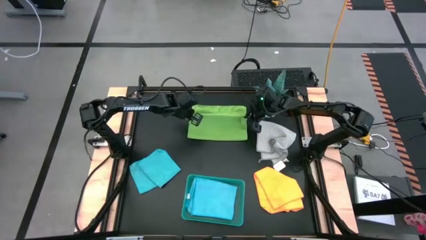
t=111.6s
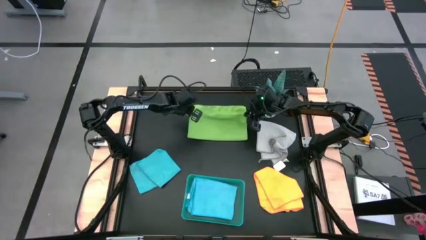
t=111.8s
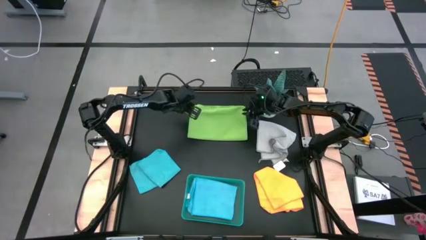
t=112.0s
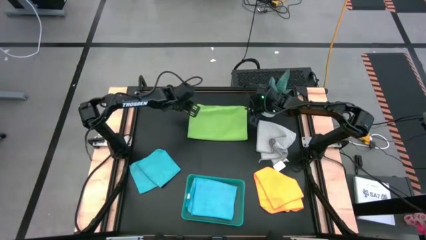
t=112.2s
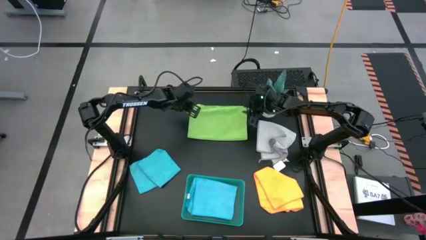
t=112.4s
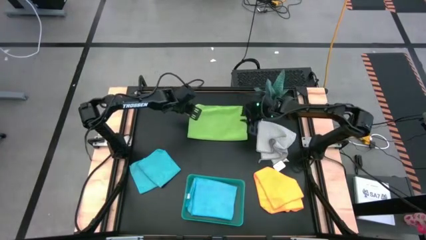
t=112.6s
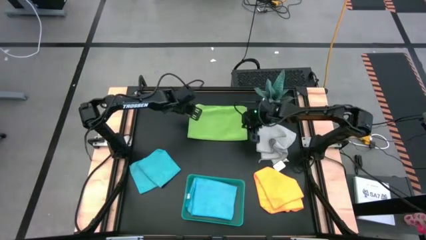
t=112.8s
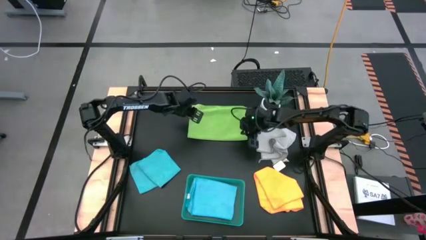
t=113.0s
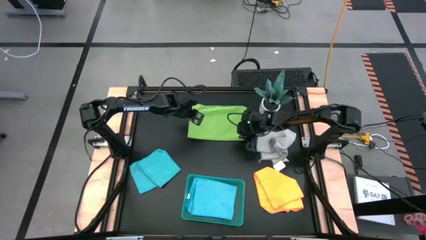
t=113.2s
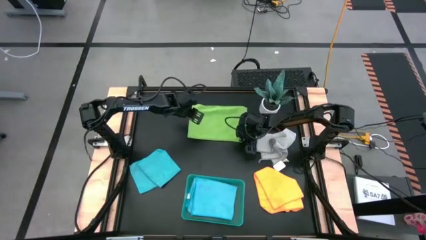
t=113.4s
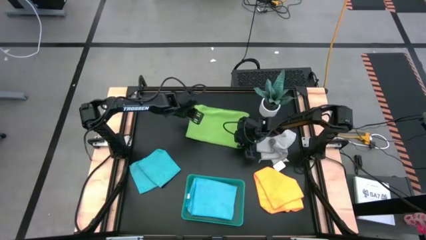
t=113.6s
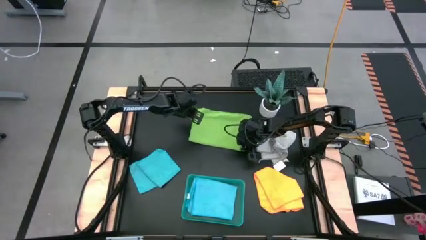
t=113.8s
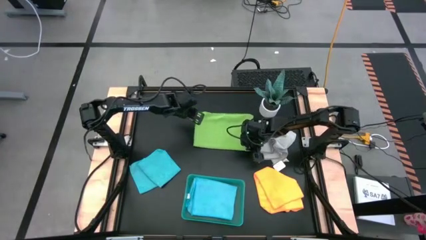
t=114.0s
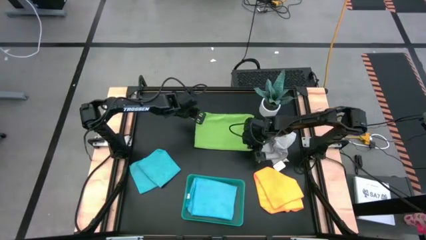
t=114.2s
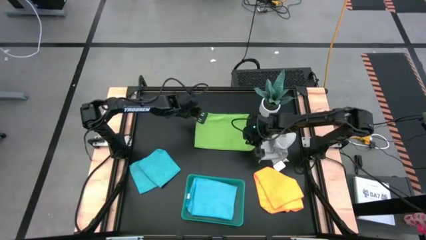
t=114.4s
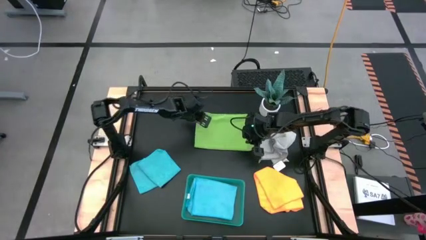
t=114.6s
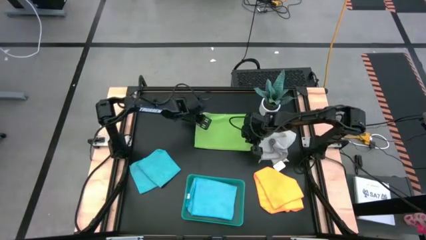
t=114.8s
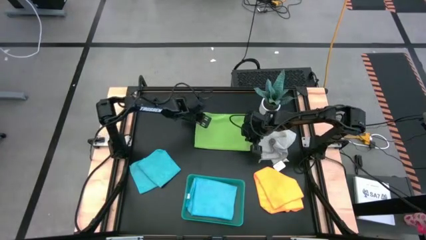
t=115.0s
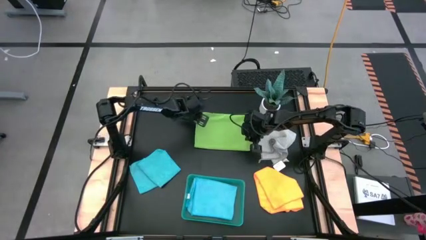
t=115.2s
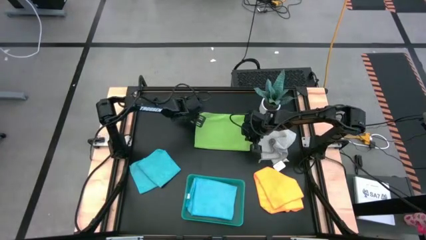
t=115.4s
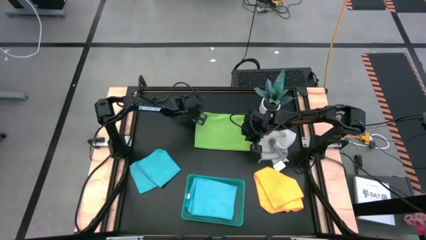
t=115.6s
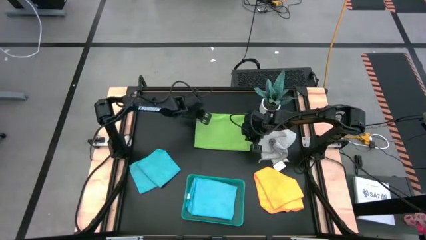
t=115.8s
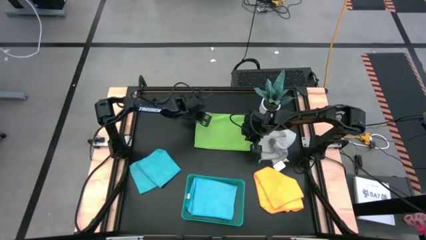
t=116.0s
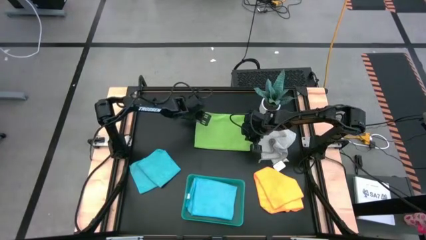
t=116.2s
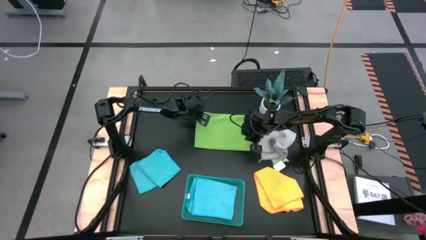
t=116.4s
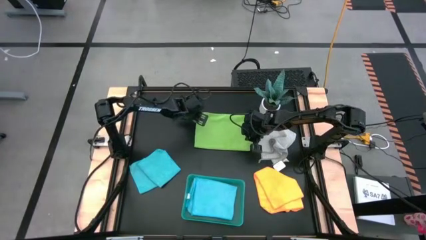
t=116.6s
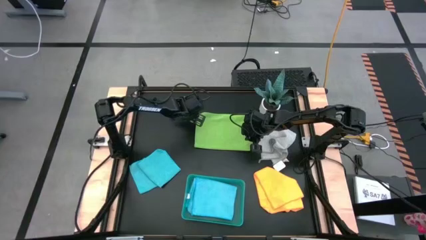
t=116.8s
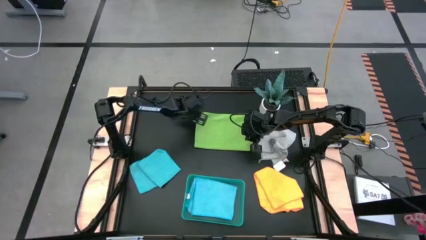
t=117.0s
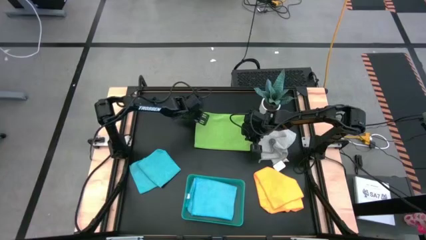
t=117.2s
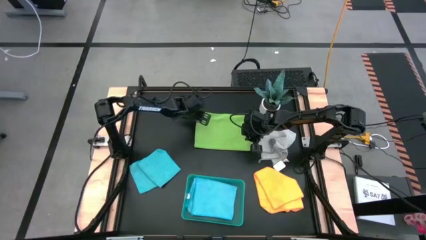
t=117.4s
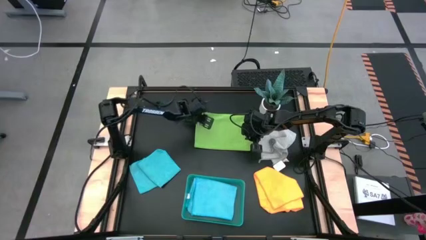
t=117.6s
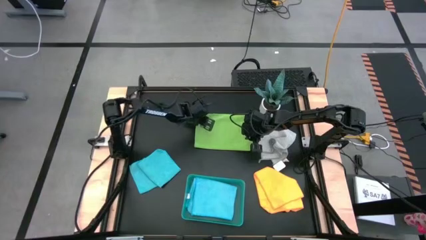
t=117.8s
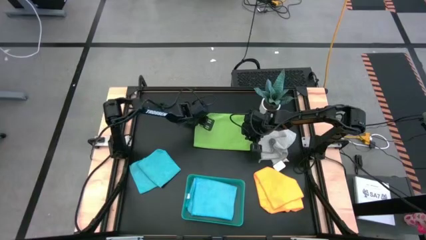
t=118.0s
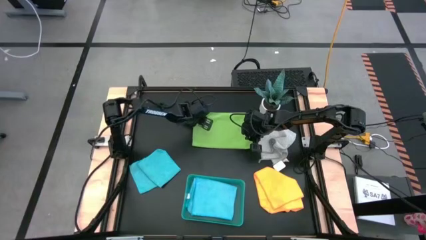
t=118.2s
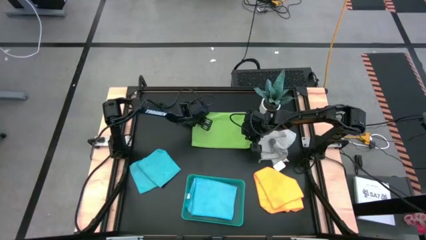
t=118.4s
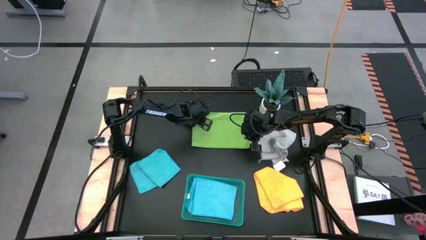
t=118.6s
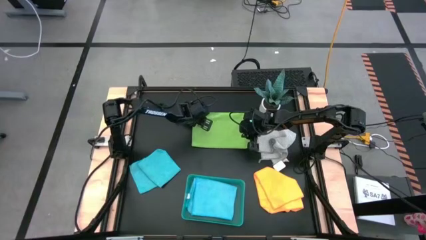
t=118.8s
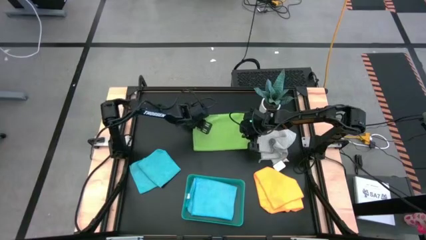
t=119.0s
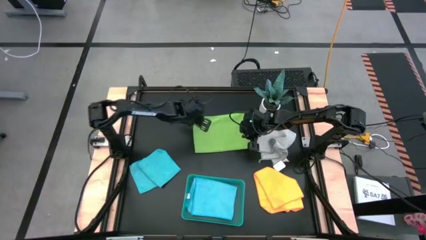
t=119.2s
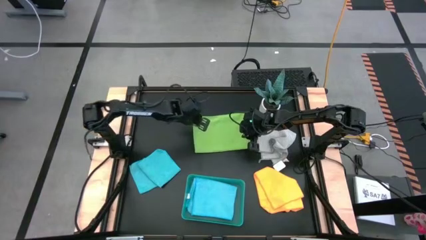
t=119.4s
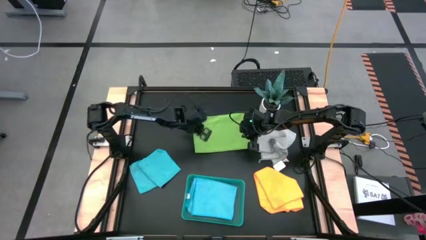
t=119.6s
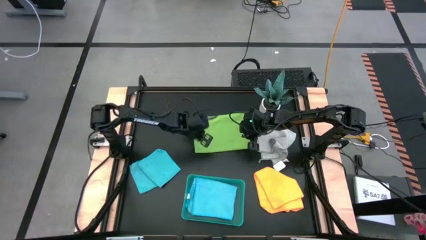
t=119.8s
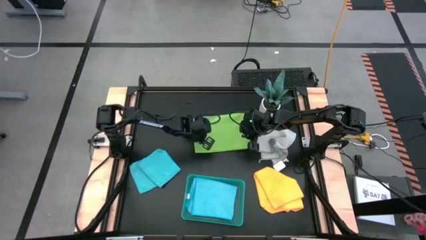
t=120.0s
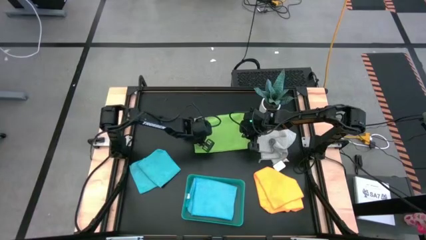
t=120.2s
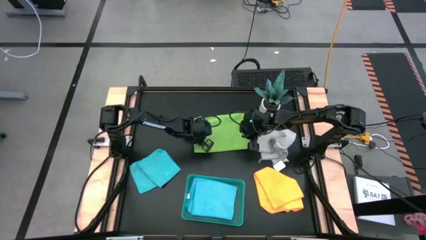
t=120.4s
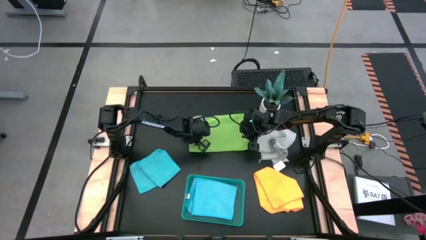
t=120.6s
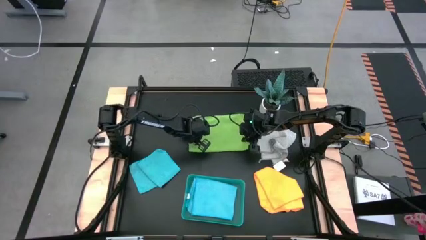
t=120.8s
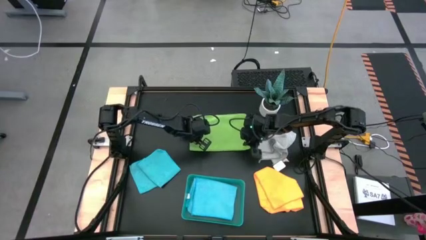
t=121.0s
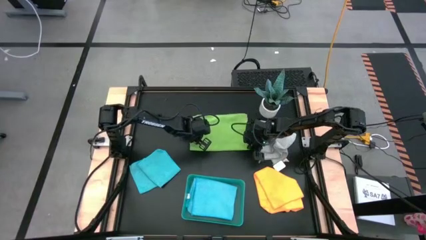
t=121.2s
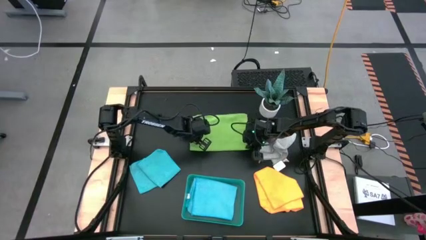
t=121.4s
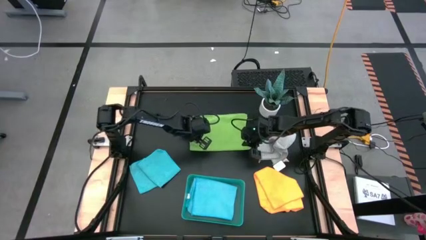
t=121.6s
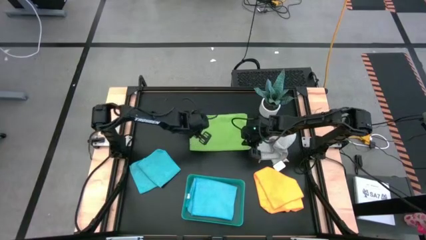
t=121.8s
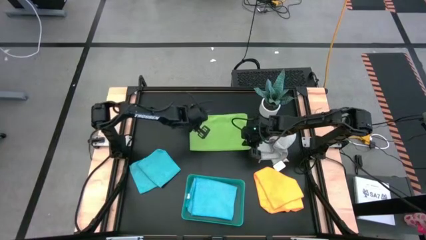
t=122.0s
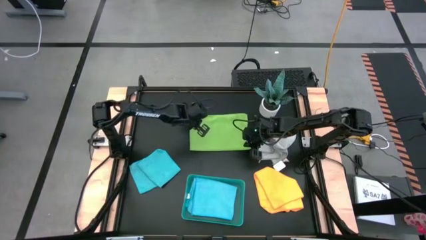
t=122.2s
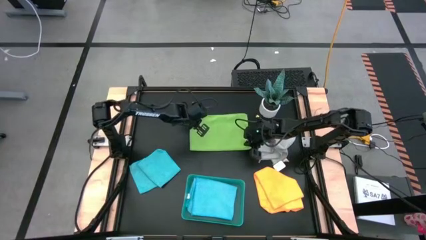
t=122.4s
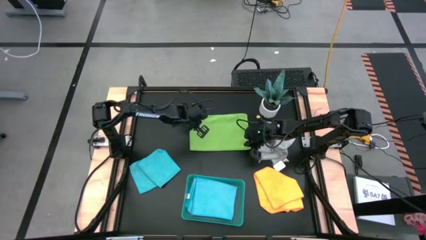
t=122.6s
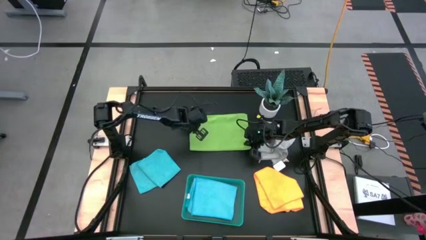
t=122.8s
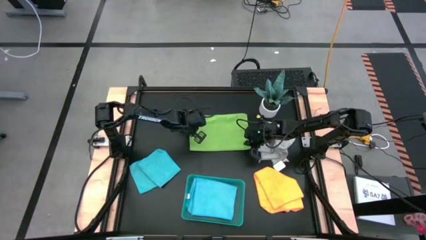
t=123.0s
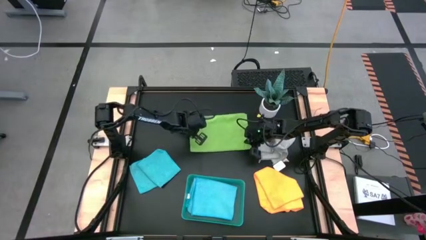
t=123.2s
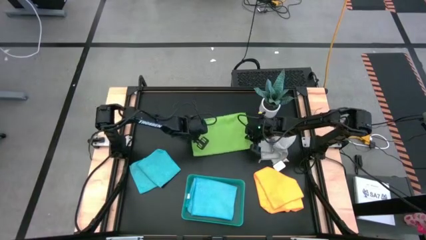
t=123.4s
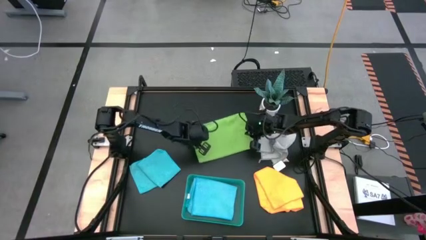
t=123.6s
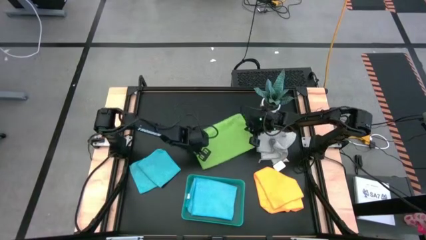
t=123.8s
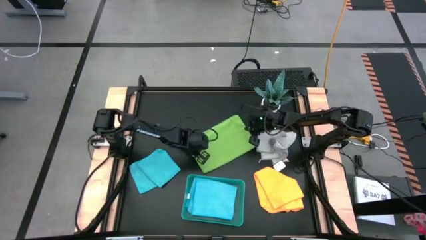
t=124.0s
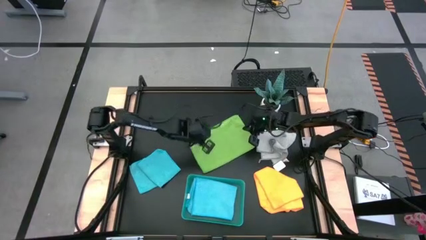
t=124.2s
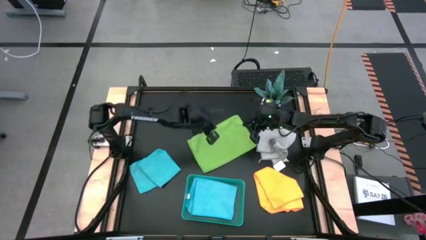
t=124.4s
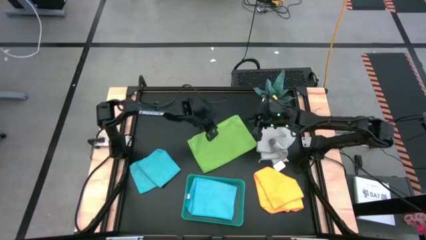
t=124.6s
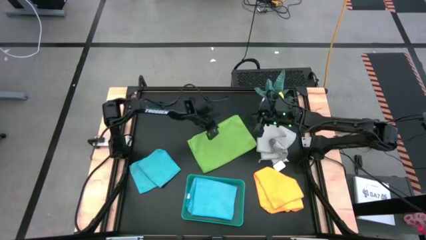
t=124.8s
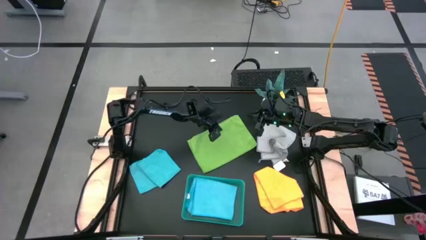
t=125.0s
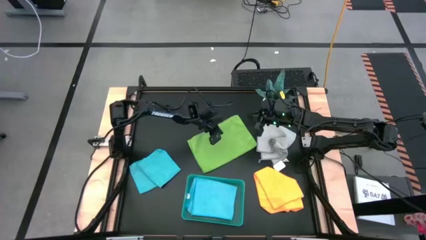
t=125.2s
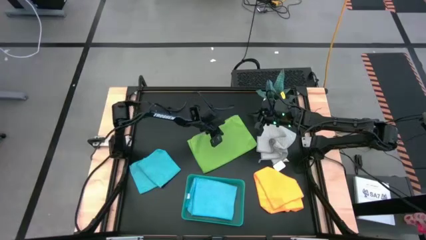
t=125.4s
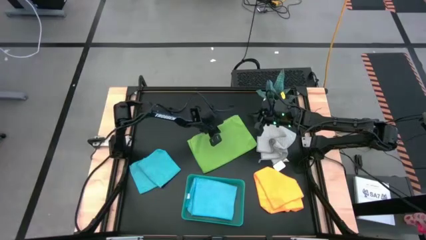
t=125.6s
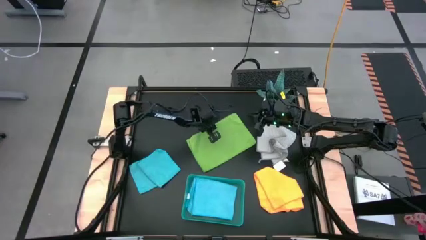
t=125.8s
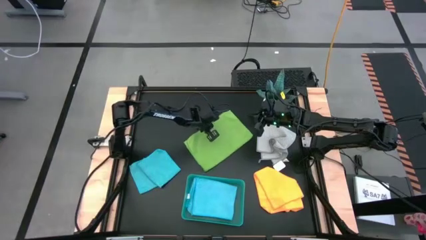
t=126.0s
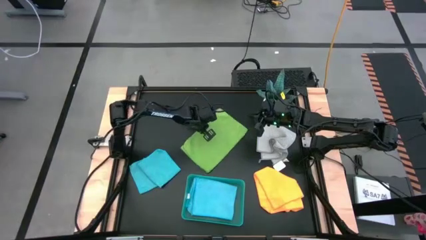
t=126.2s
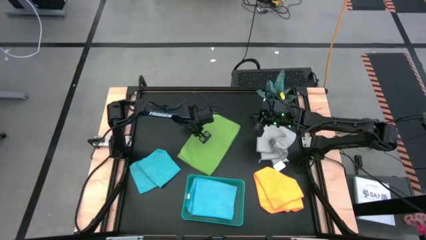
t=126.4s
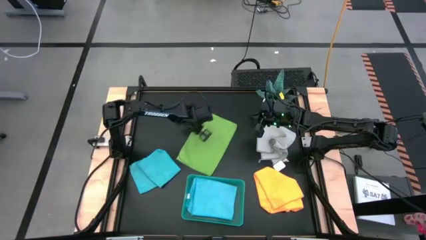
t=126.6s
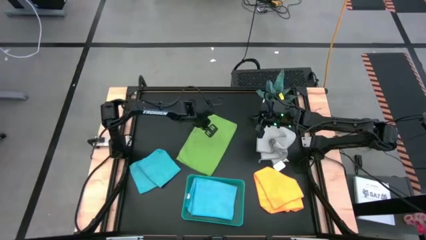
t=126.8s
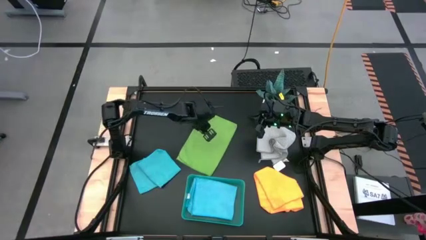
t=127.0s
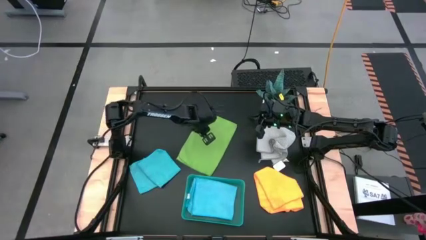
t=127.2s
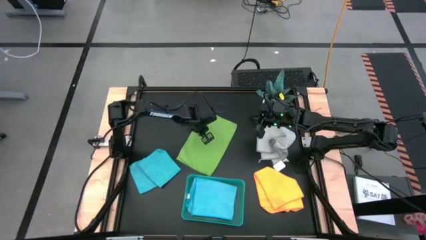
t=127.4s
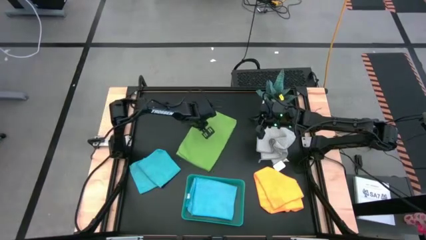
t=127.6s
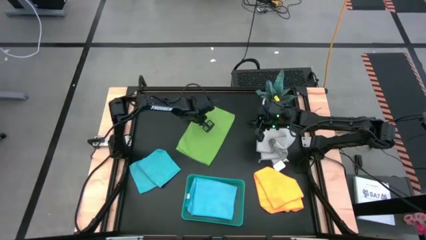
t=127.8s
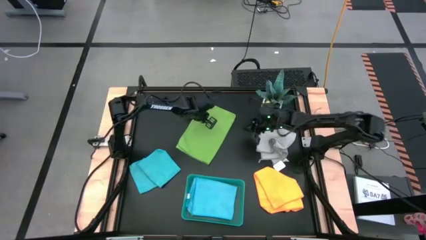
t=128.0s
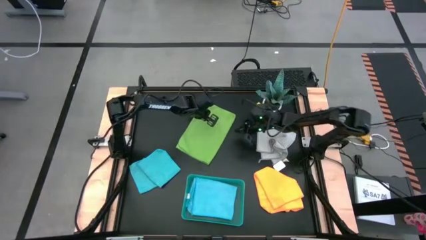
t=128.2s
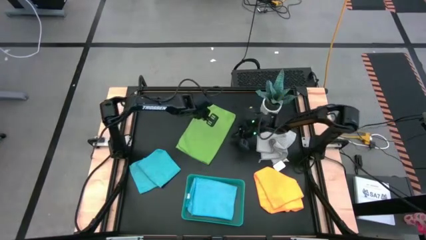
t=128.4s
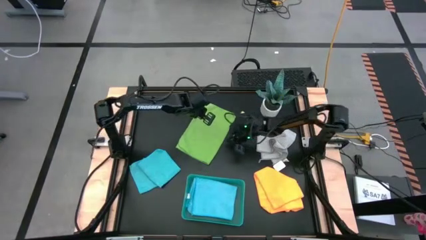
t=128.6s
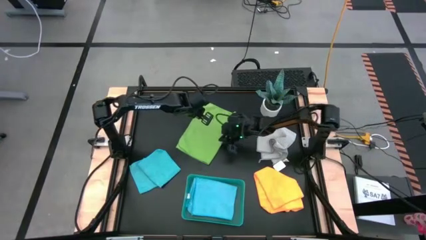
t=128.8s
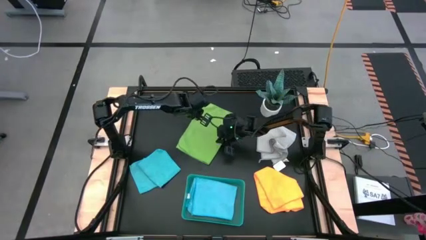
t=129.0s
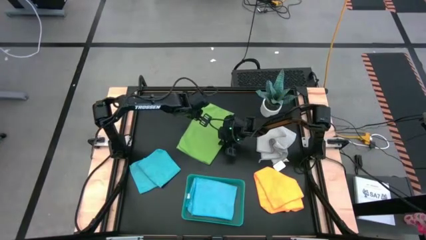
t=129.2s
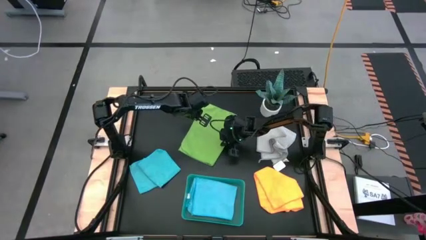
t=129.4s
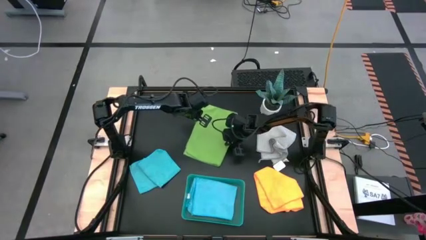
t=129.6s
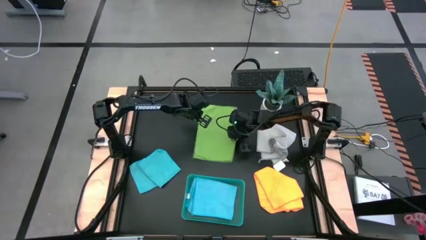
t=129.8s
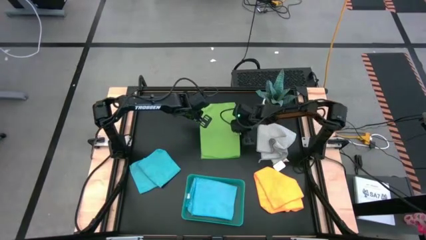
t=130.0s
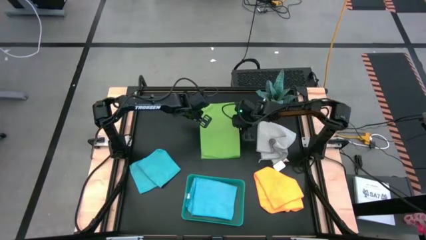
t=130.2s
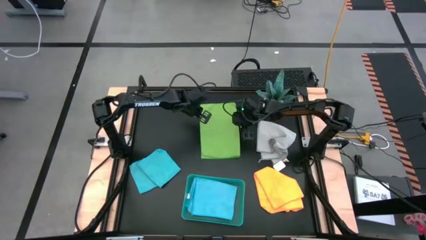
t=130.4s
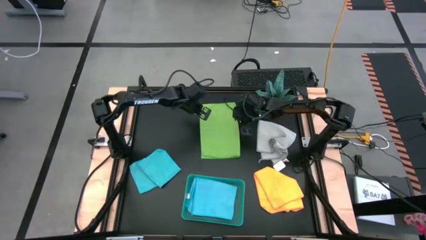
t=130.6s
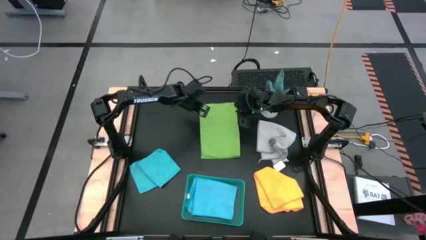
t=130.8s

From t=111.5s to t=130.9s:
Task: Fold microfiber towels
Fold the green microfiber cloth into the bin
